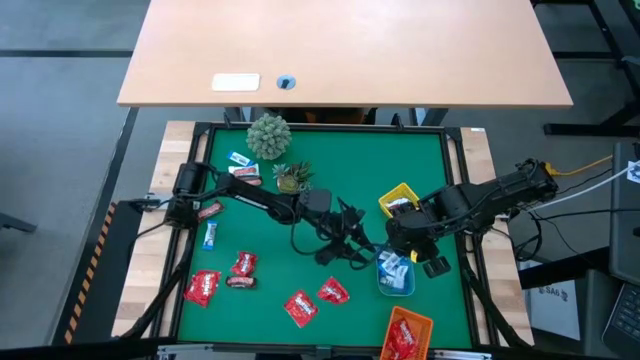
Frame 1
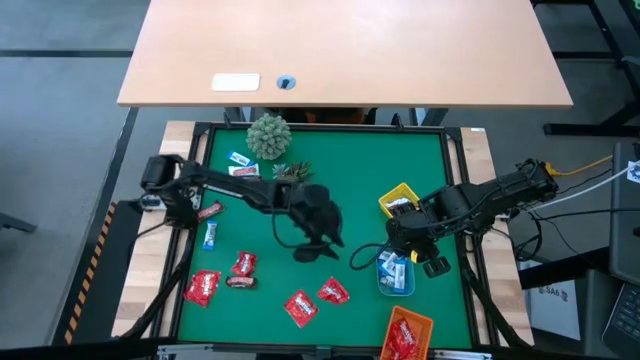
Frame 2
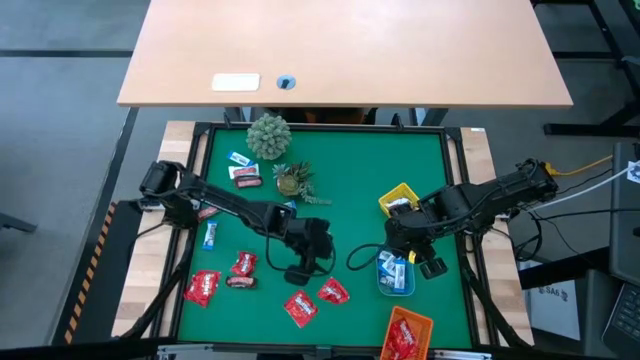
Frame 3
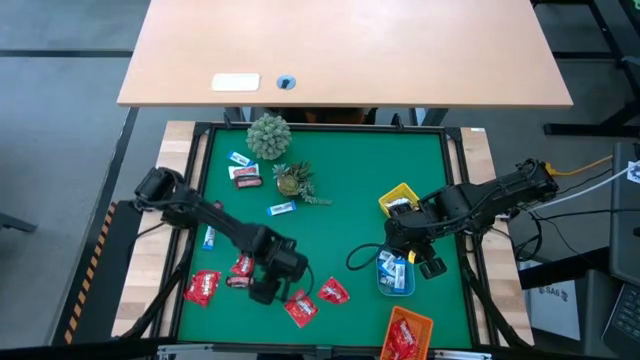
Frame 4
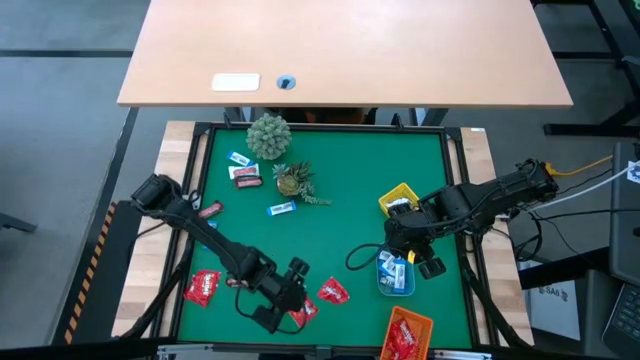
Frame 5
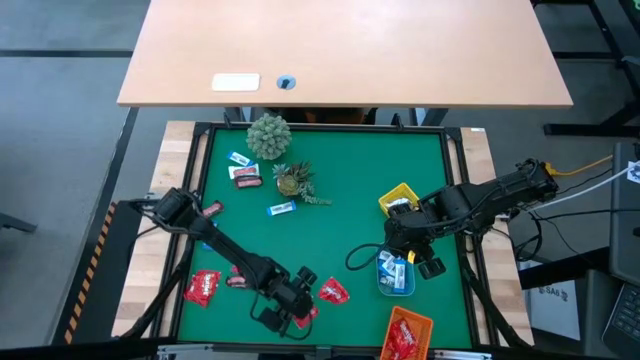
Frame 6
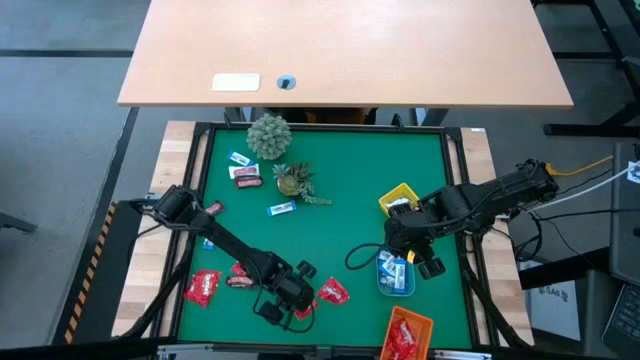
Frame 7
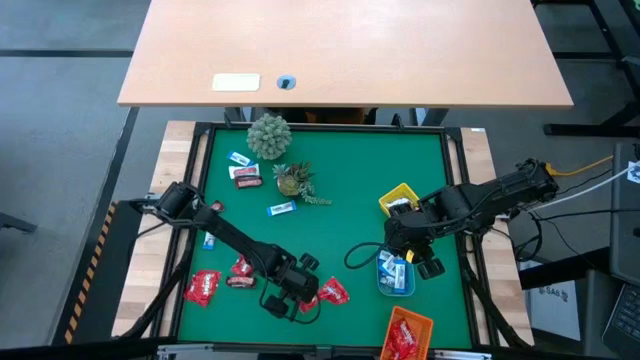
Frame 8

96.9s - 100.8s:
Task: Sort candy
Put the red candy into the orange bin

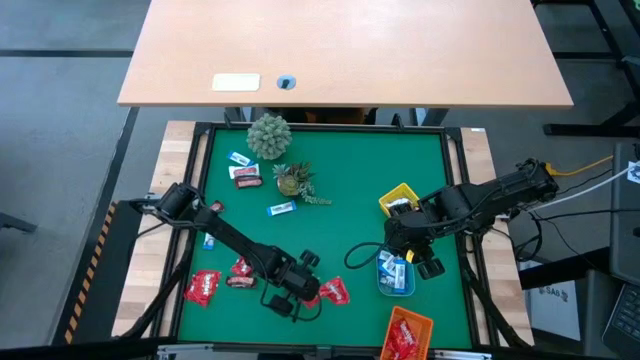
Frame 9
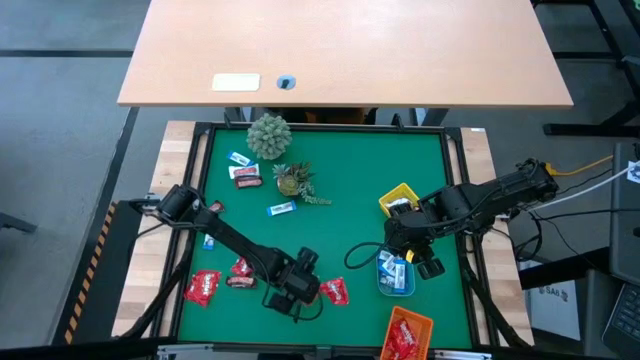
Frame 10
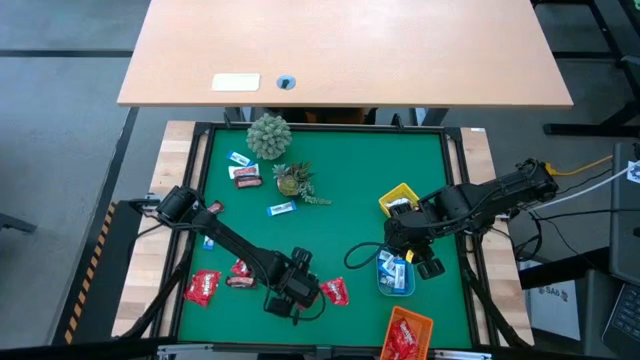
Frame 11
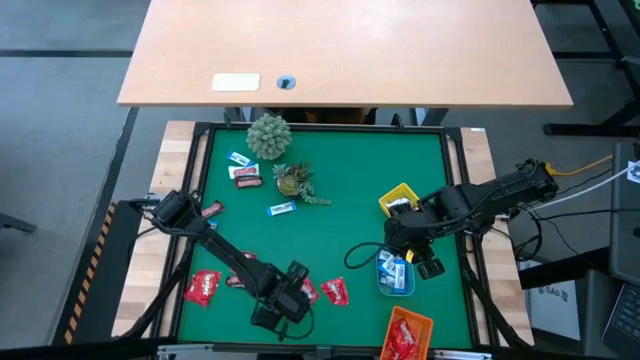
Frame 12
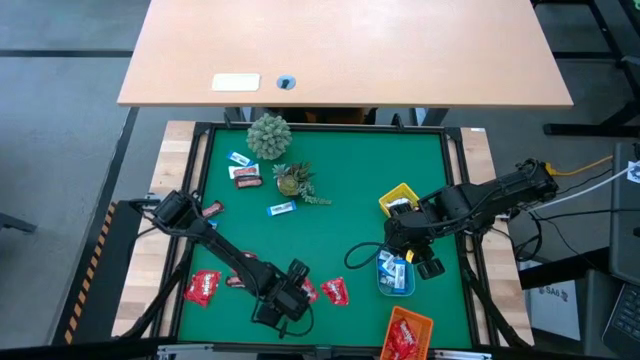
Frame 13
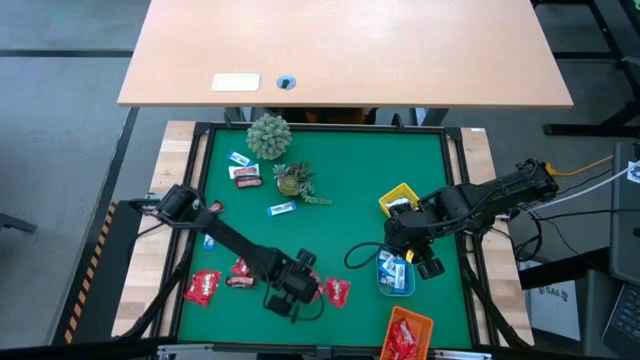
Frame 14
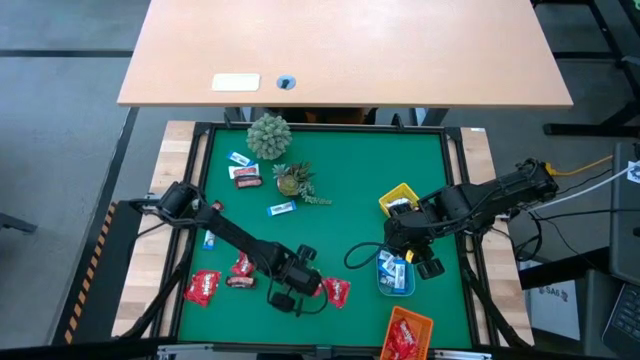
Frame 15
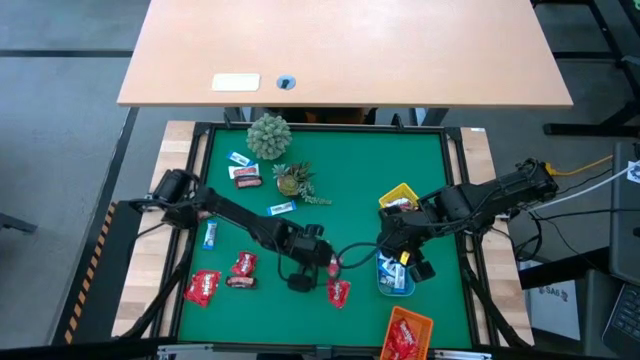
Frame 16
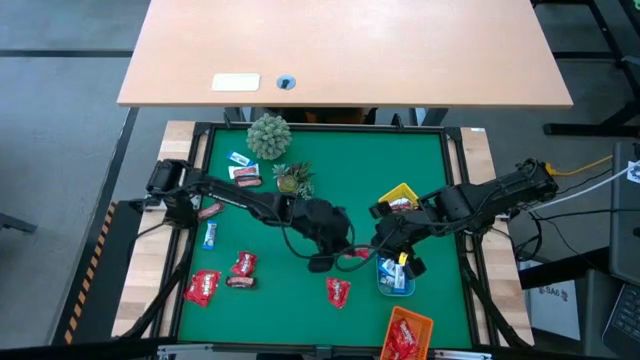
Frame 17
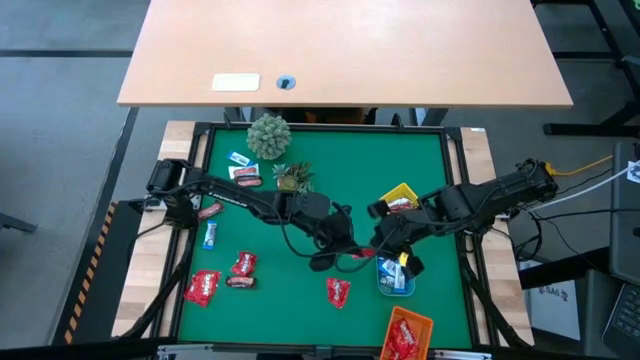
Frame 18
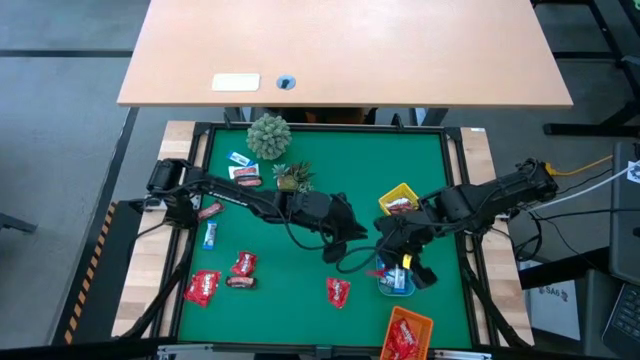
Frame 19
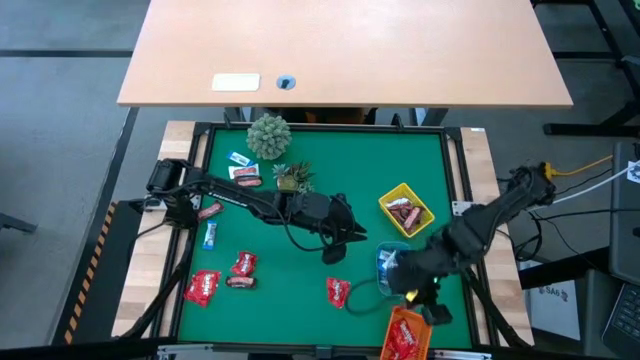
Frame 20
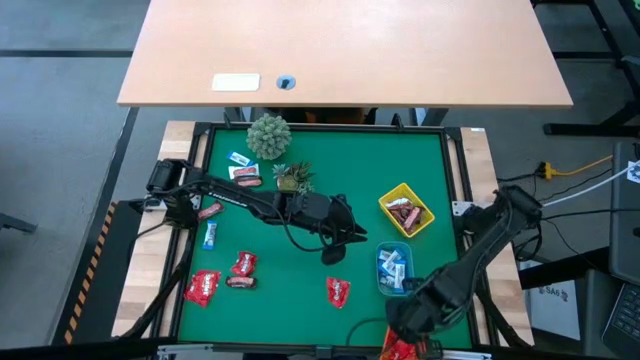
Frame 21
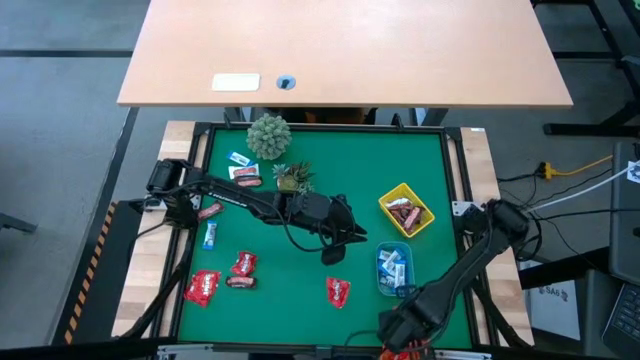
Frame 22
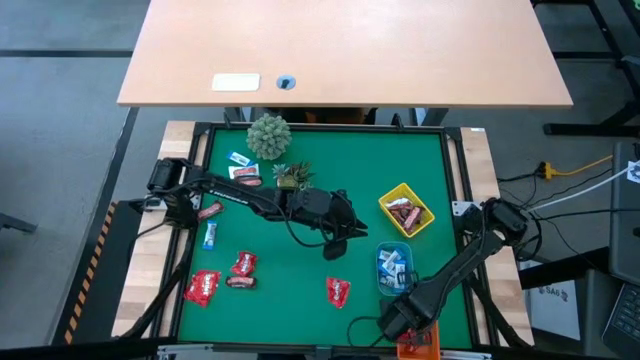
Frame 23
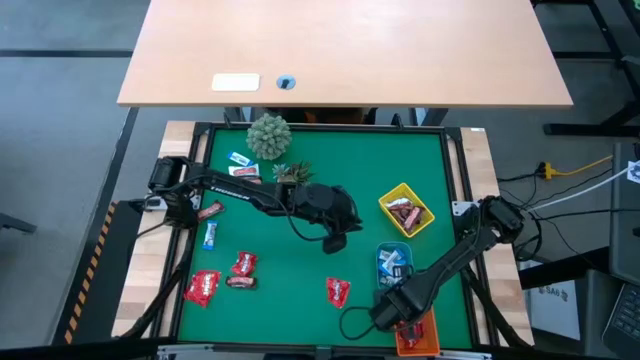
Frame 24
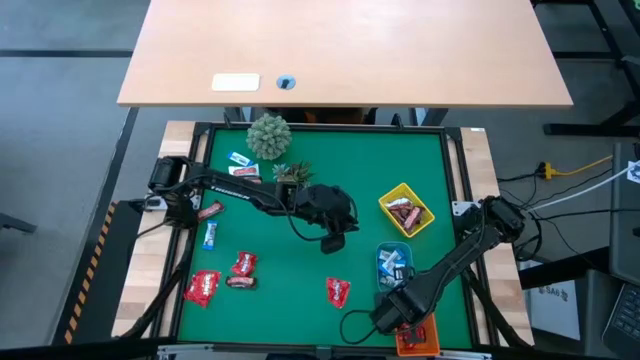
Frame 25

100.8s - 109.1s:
Put the red candy into the orange bin

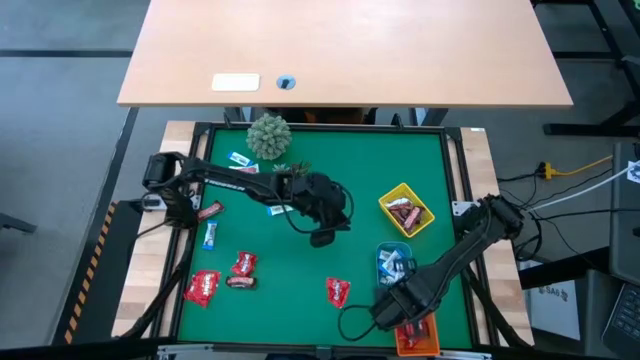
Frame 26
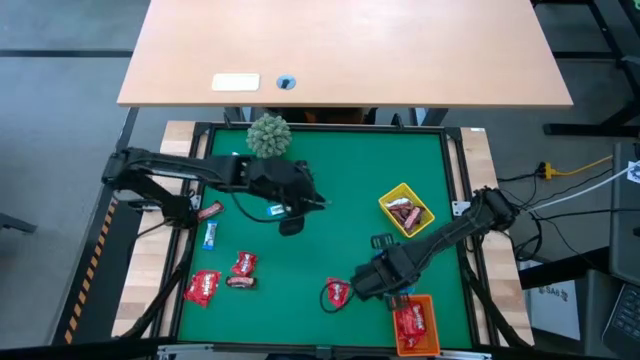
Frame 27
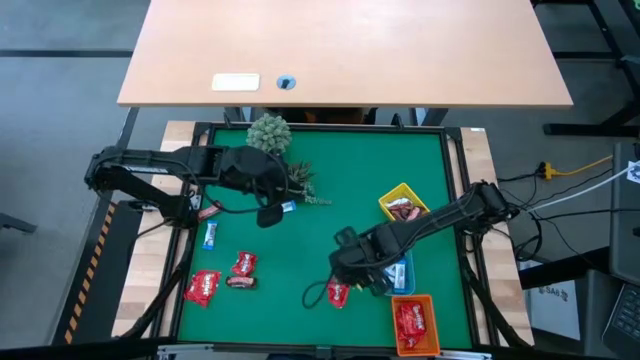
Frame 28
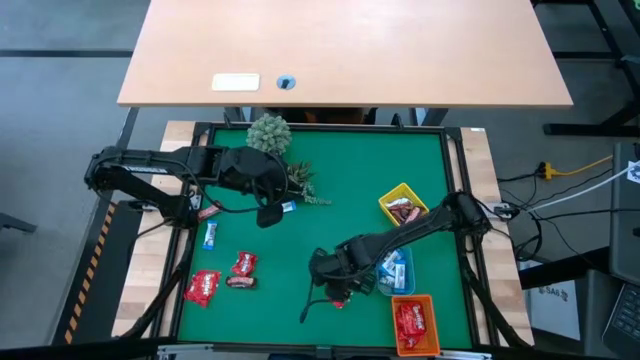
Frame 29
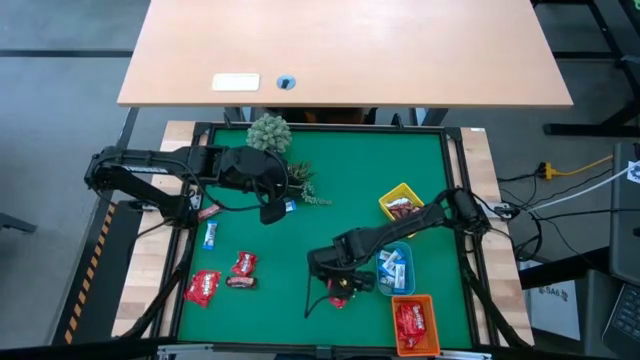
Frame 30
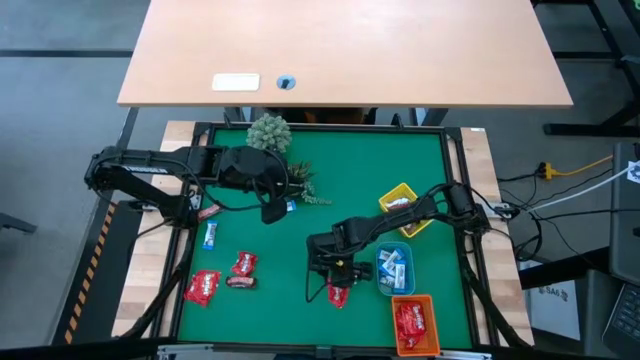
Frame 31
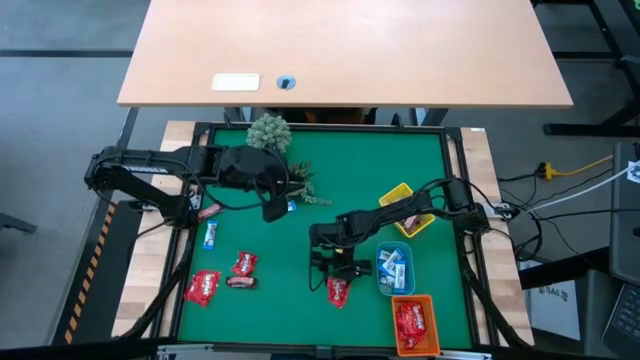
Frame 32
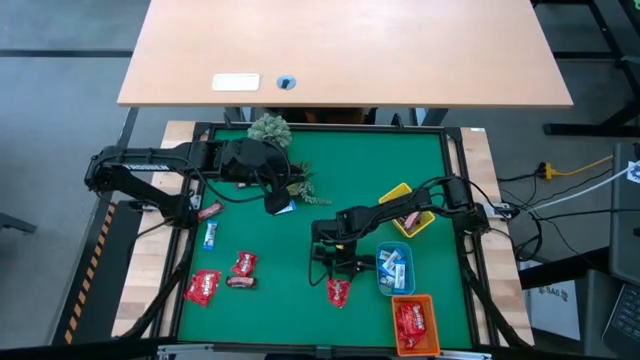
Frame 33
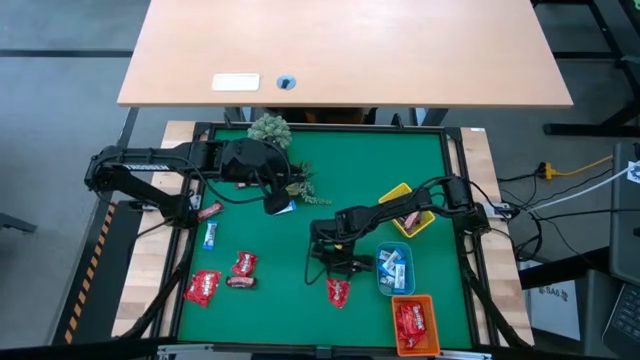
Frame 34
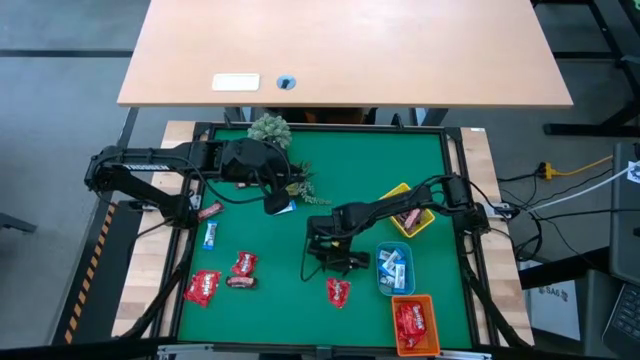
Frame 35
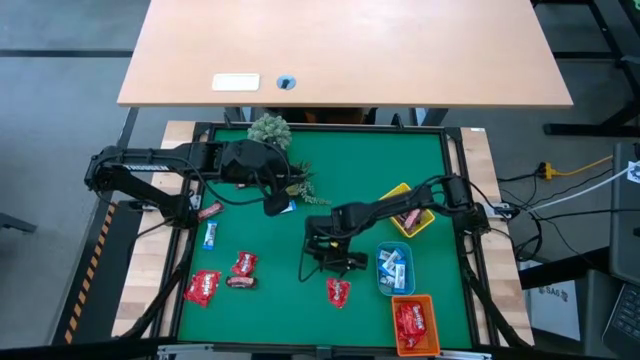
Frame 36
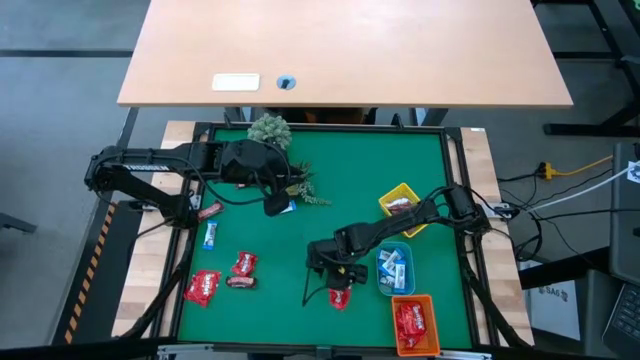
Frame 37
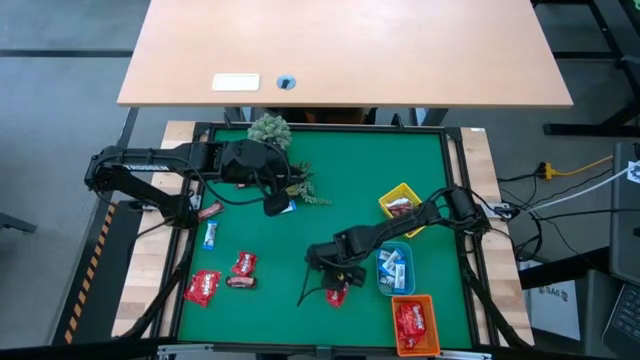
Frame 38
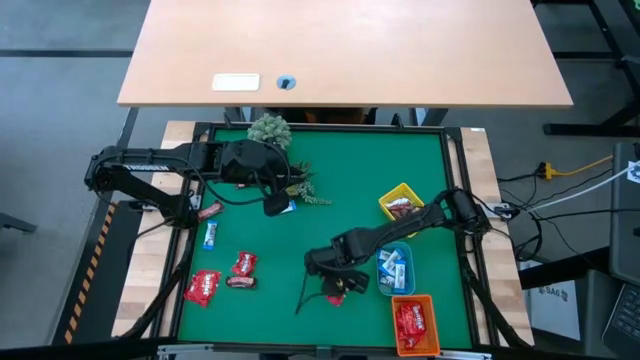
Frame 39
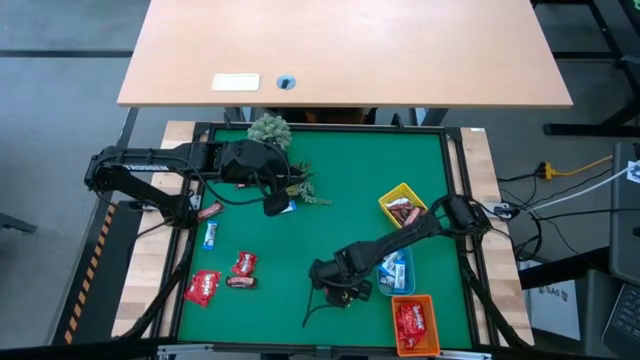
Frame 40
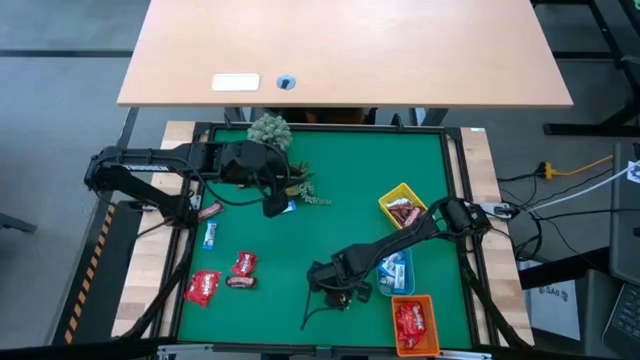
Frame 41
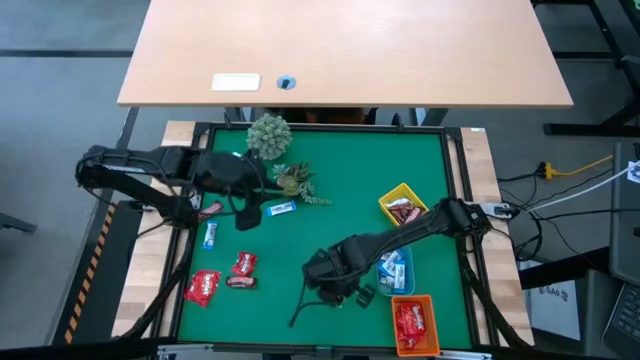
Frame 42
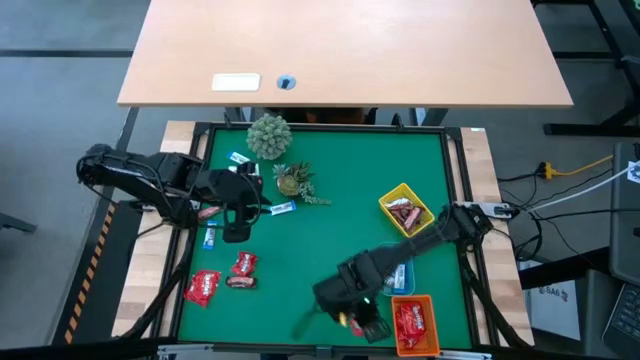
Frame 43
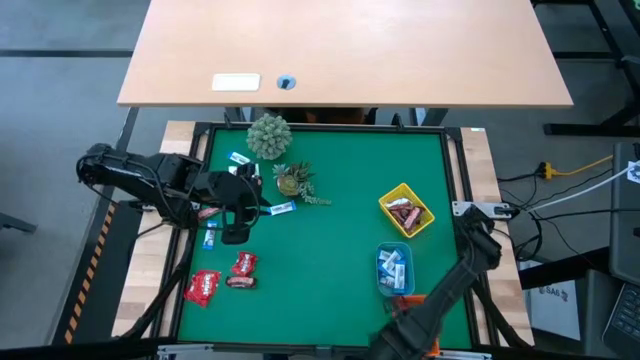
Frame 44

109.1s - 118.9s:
Put the red candy into the orange bin
